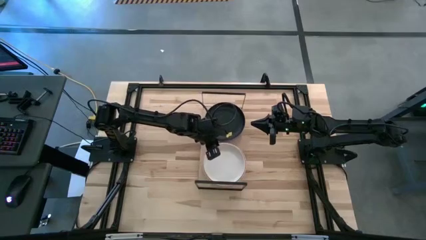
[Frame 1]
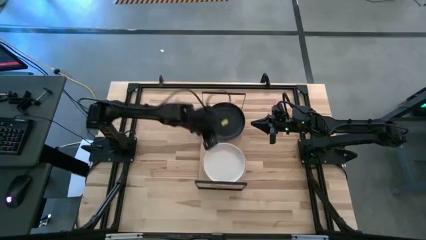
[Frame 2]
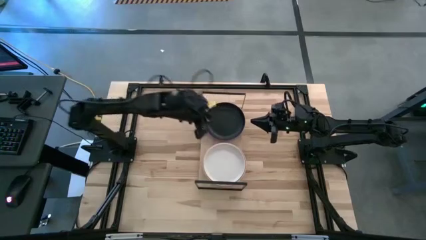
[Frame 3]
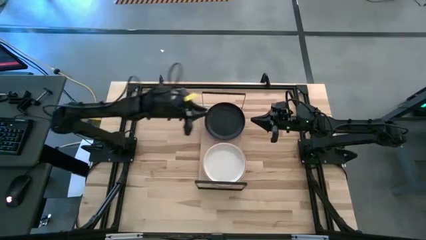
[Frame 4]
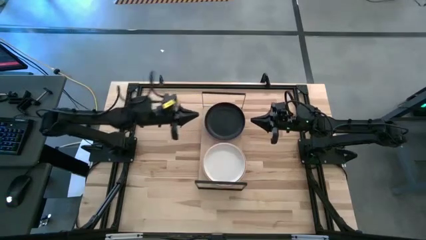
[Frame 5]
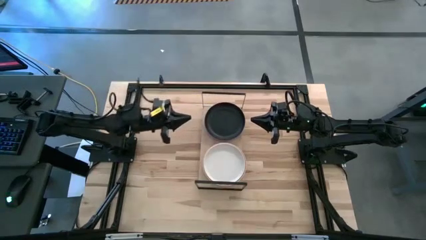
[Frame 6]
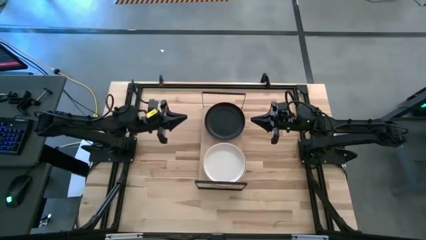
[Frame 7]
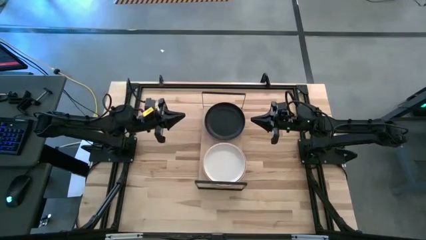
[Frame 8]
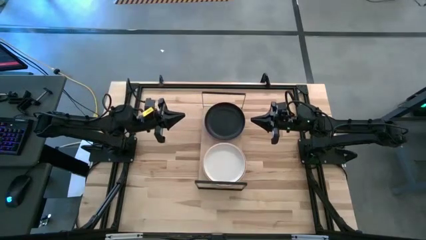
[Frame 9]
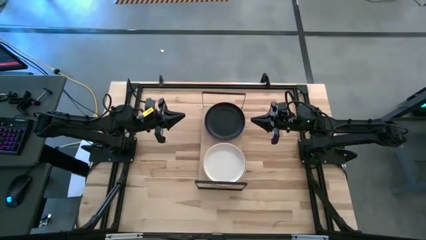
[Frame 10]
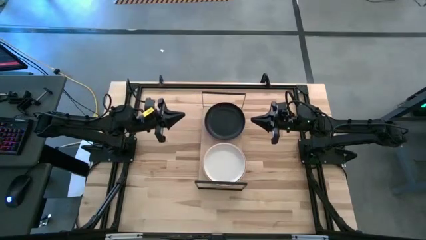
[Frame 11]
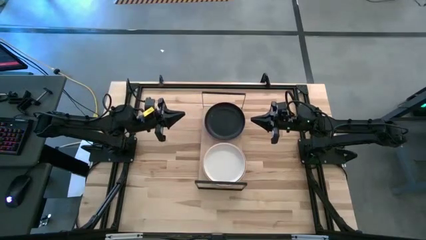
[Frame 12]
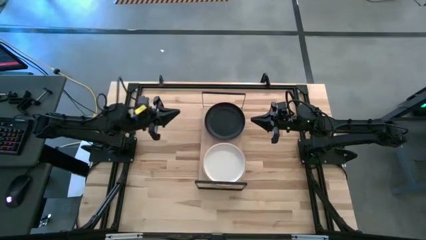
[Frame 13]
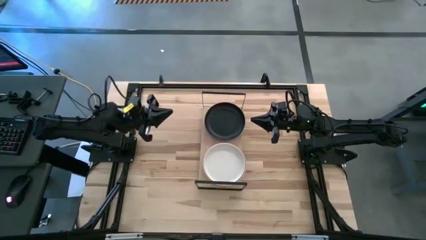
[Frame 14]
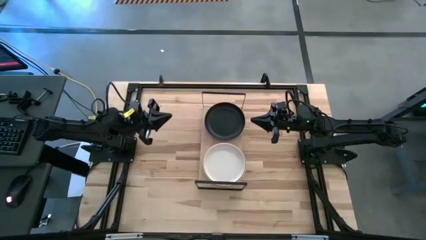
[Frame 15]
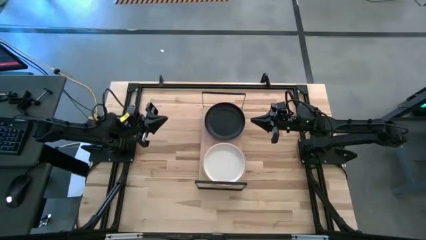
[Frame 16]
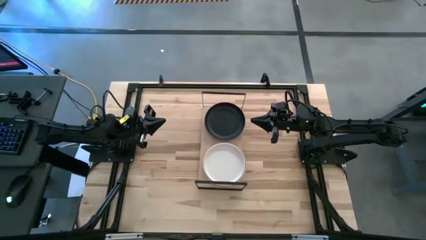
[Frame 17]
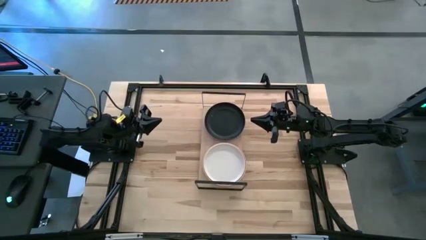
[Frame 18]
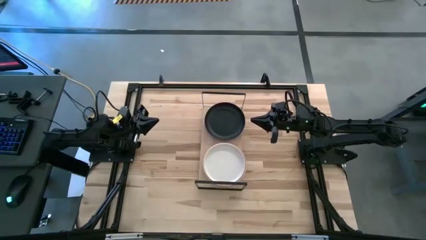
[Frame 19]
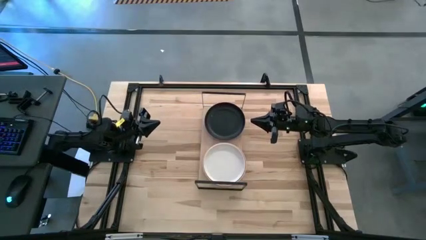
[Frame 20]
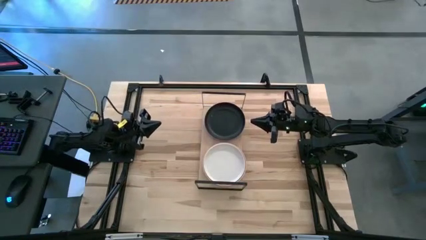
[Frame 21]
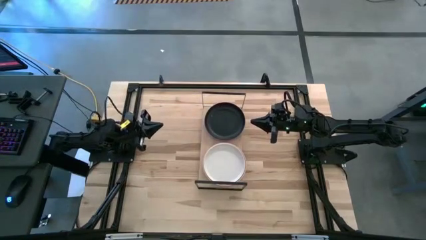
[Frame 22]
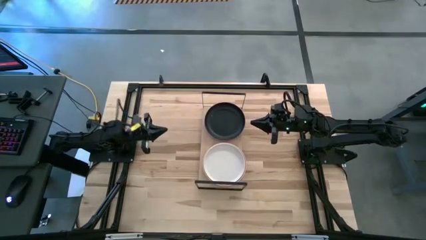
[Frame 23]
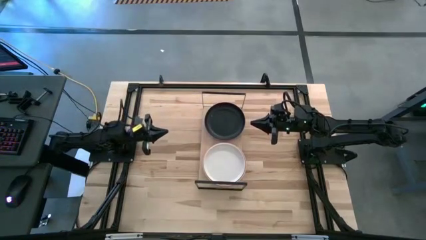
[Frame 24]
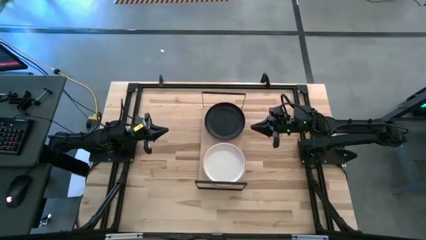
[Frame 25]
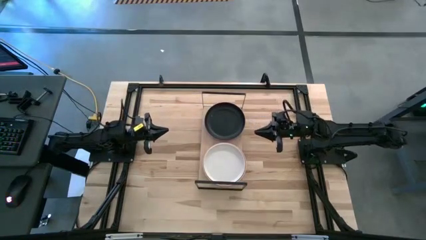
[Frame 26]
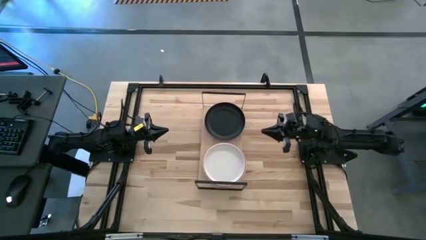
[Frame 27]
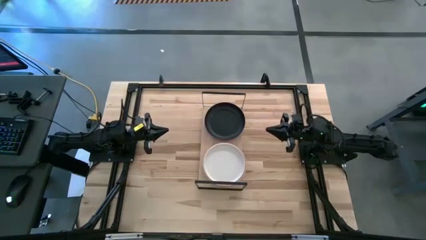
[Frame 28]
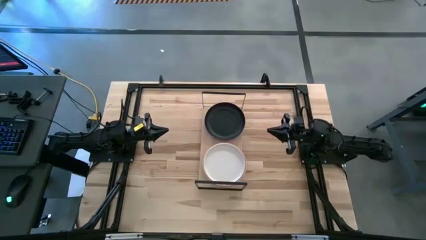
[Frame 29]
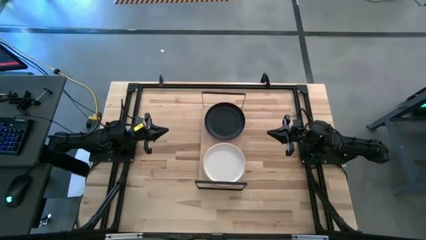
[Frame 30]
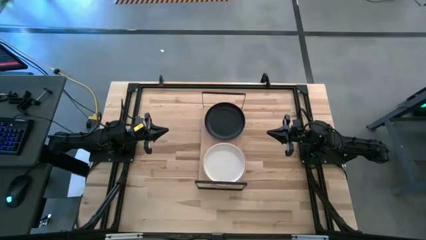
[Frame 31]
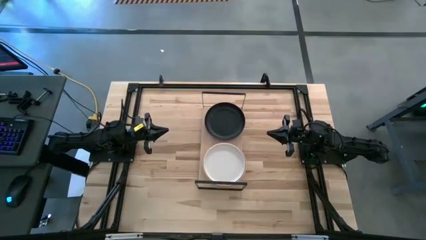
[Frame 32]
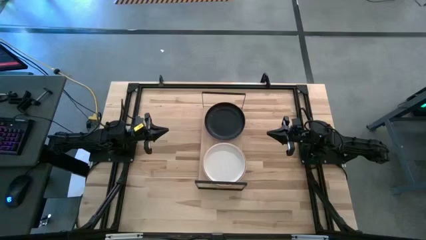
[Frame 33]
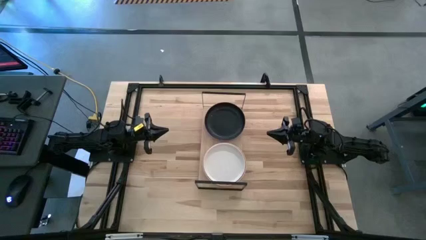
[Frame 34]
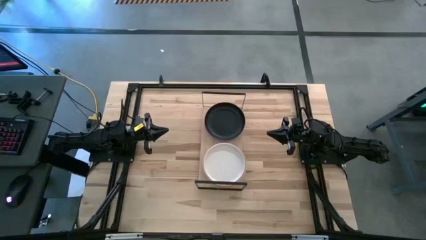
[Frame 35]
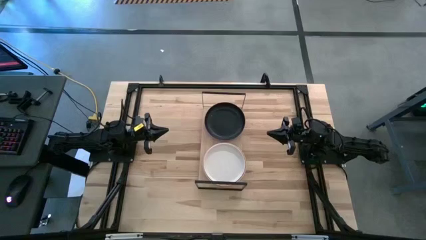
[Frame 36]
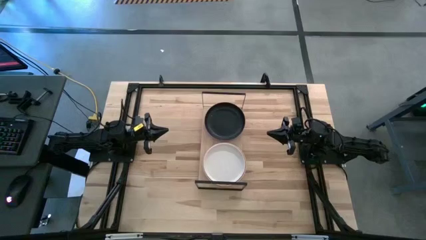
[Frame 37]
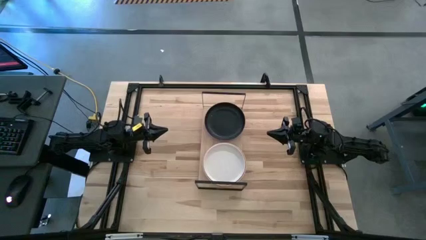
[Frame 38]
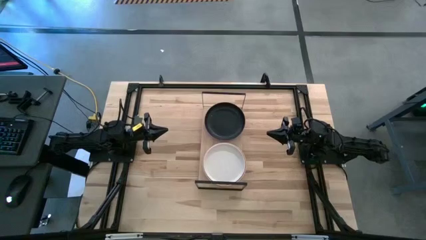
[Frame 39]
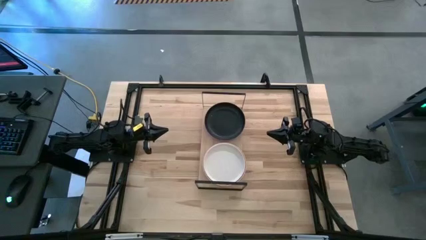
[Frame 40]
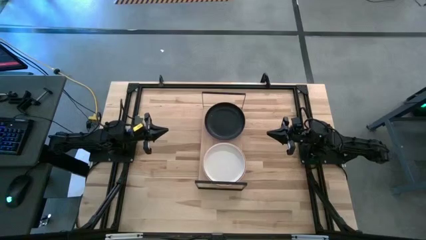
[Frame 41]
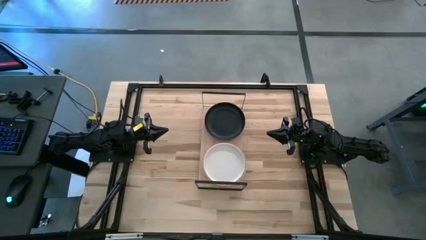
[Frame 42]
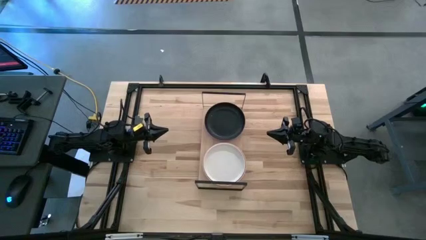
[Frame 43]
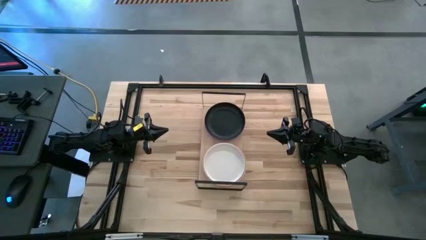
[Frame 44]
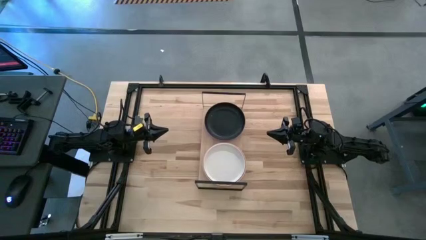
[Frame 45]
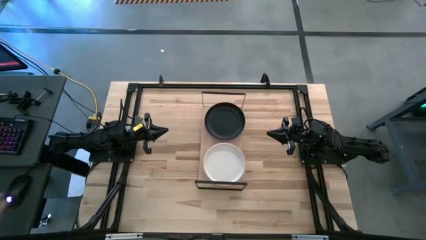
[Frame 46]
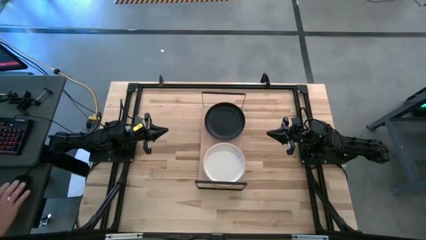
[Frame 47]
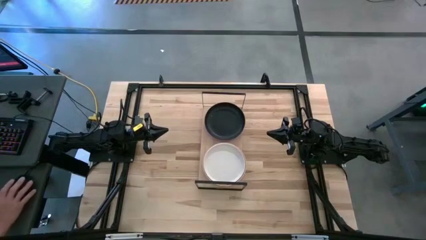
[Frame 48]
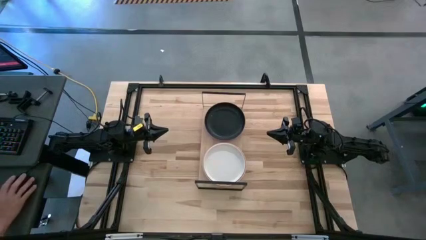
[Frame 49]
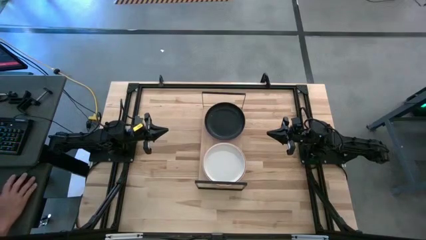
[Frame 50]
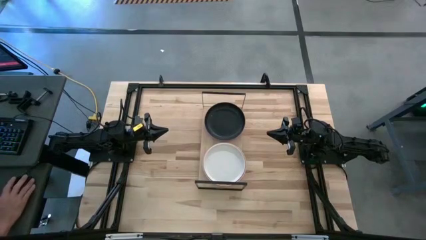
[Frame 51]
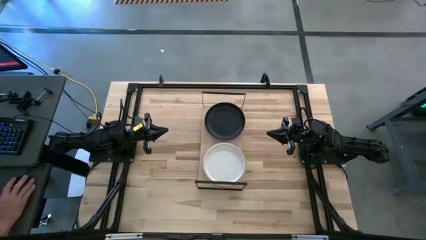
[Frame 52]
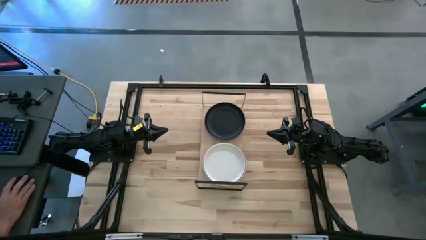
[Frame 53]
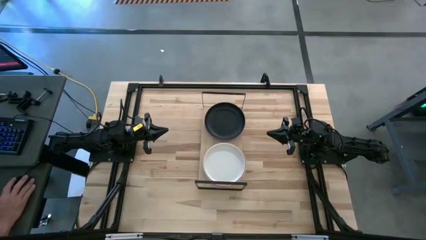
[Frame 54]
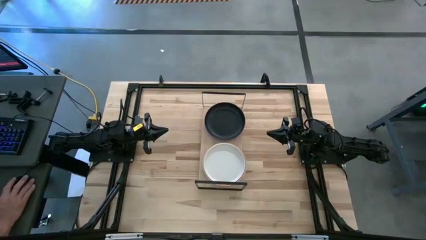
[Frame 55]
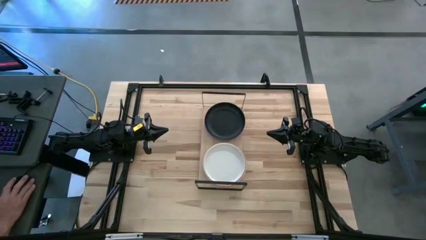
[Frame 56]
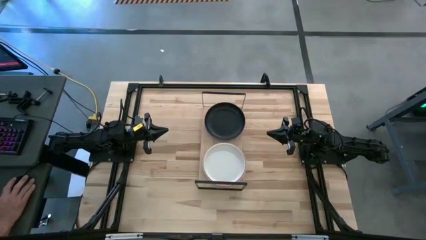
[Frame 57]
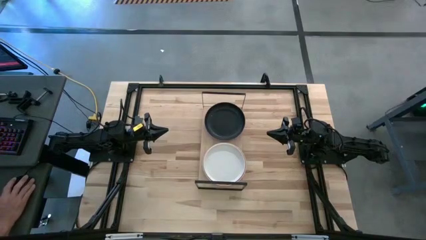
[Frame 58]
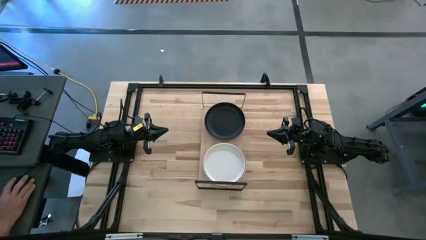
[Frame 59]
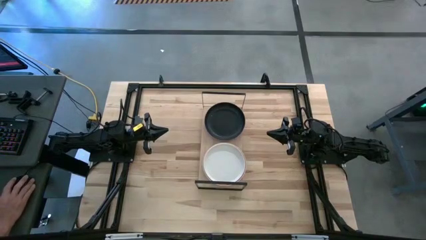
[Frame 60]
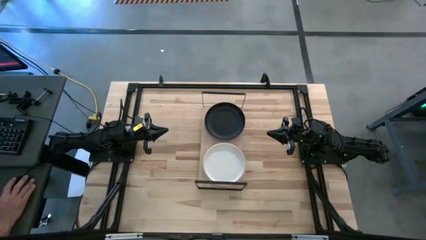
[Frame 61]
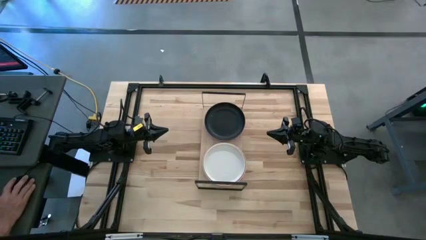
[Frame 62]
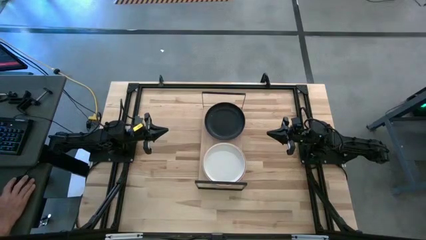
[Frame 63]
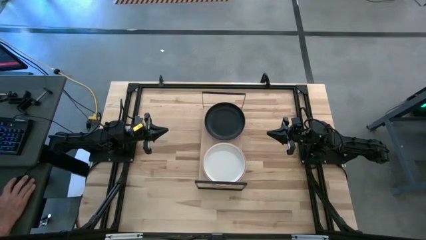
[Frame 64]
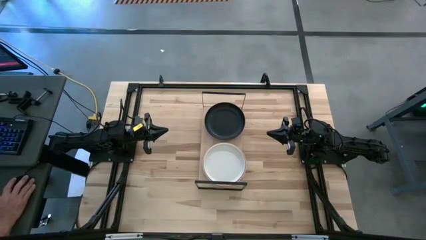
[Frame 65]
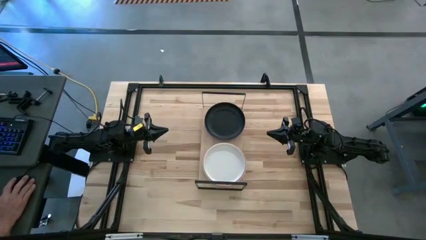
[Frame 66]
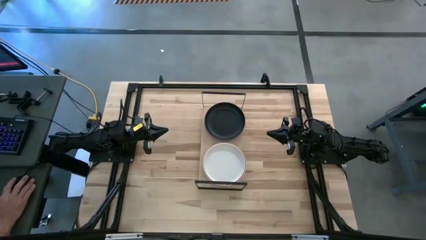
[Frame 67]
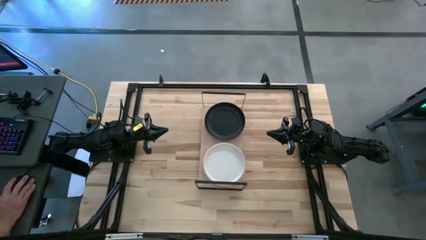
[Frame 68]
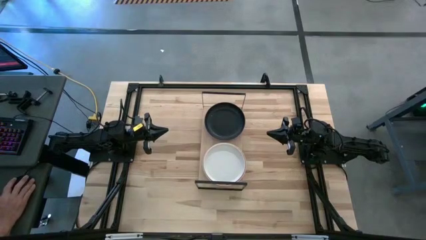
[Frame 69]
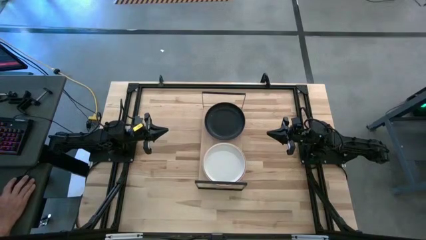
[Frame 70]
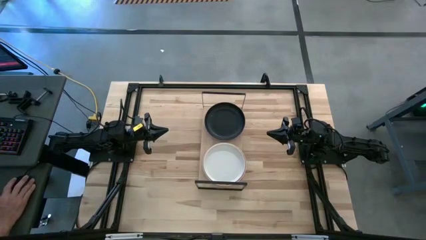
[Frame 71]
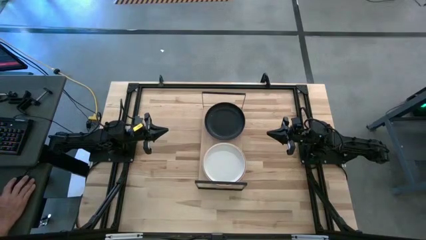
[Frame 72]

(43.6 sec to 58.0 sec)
Task: Place and stack plates onto a shelf
Return to Home Position
